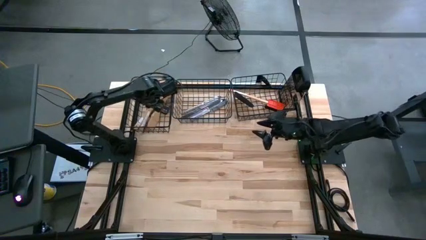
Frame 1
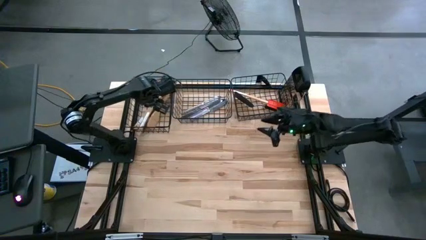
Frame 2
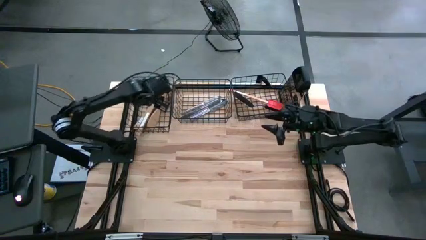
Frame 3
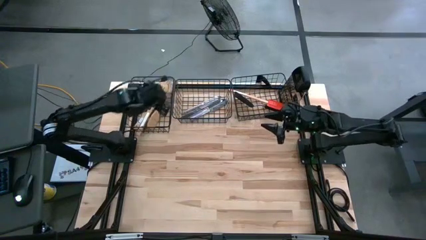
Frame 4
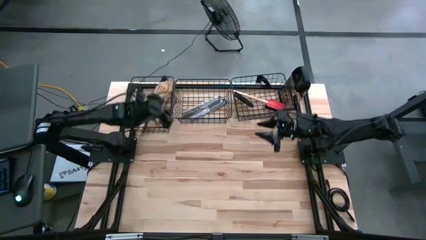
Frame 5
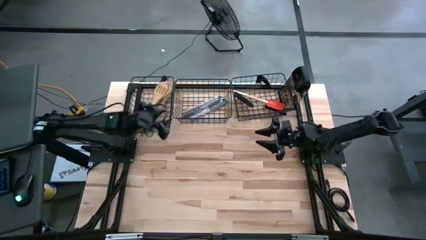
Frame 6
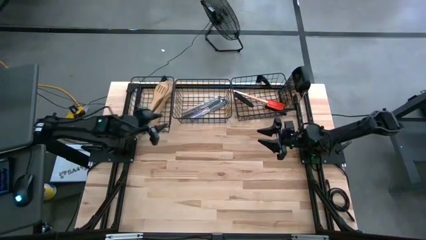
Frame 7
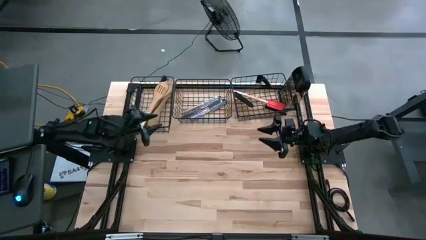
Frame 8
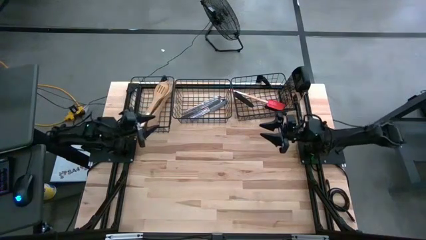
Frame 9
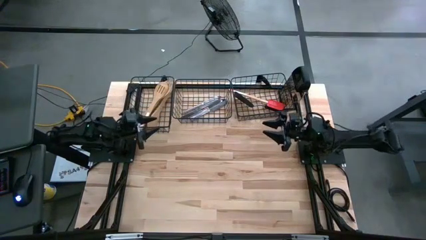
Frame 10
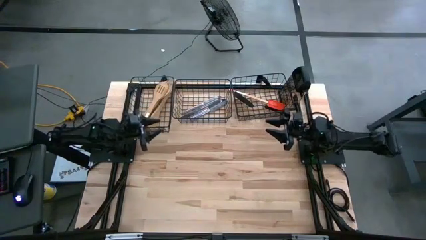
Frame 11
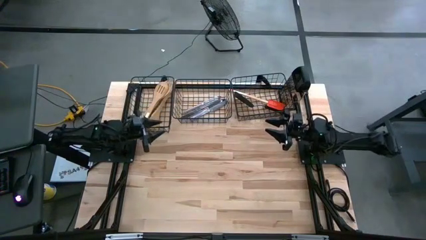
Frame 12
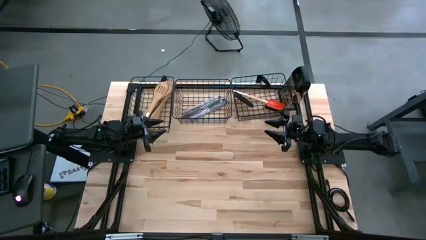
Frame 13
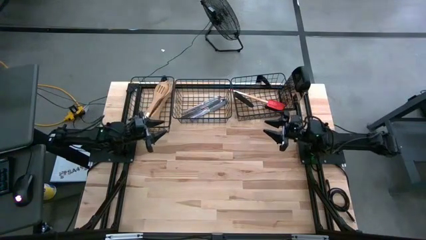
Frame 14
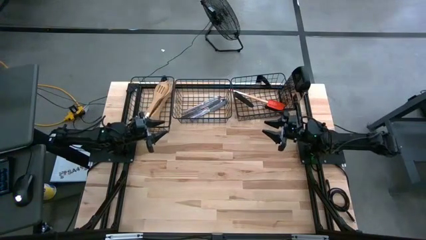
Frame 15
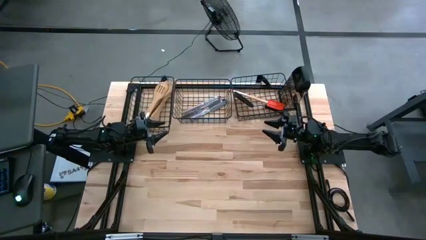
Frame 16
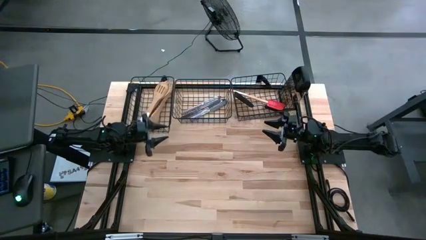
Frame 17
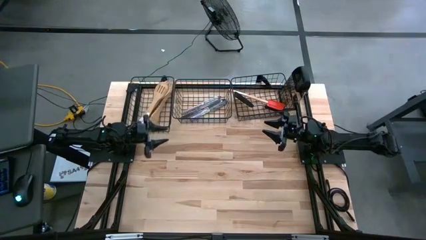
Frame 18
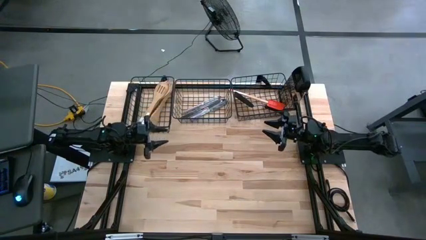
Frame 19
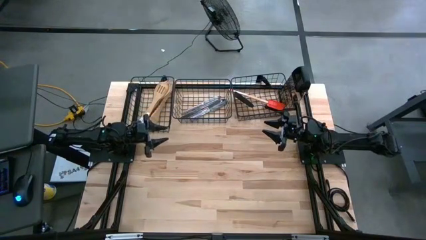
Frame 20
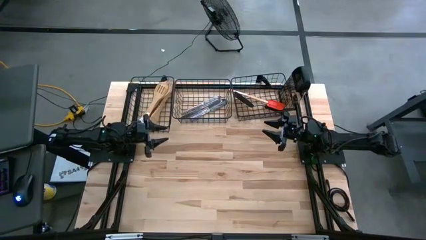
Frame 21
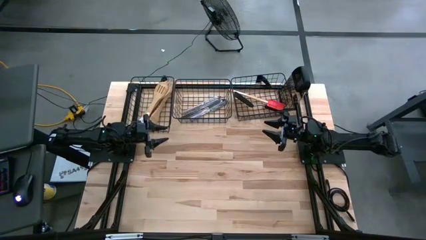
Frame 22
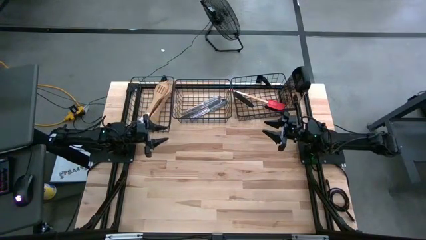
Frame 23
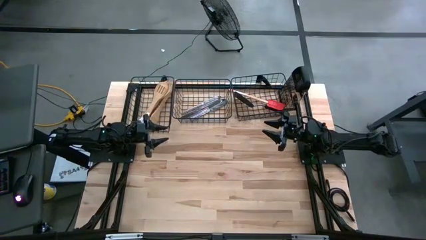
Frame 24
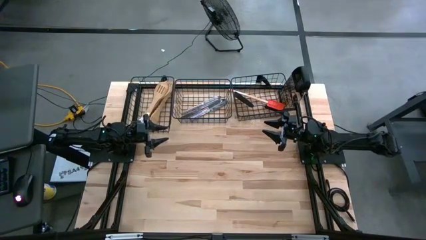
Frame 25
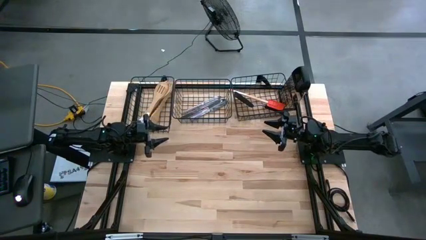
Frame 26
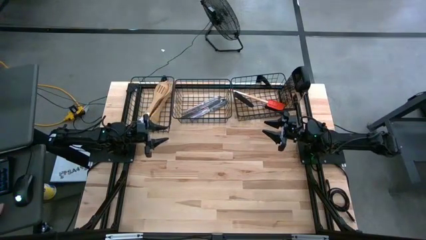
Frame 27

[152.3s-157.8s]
Task: Pick & Place Kitchen Items
Return to Home Position

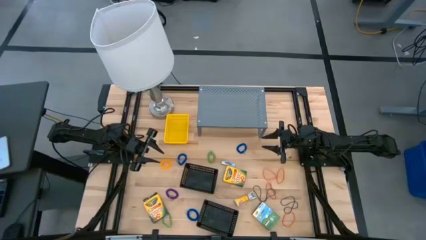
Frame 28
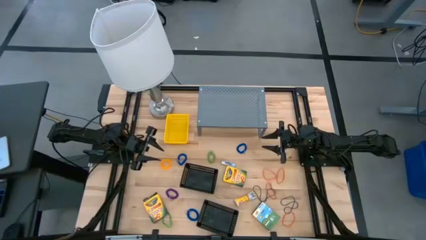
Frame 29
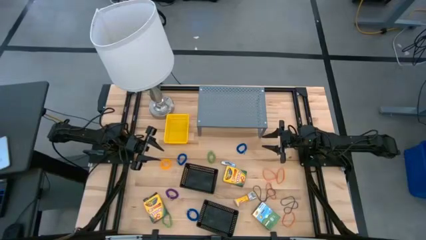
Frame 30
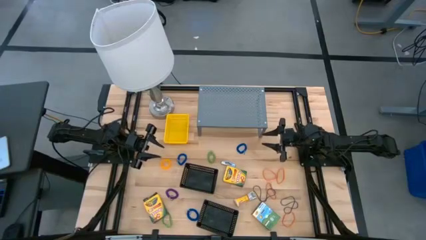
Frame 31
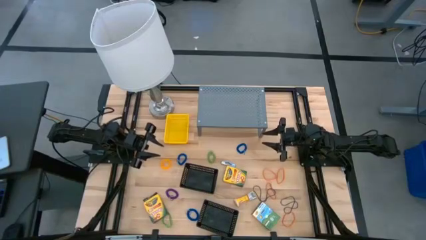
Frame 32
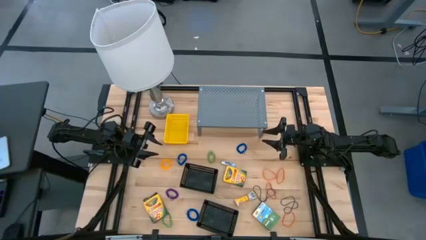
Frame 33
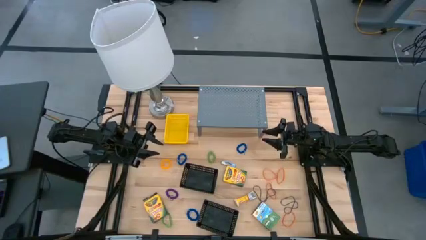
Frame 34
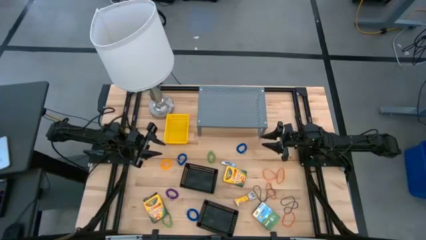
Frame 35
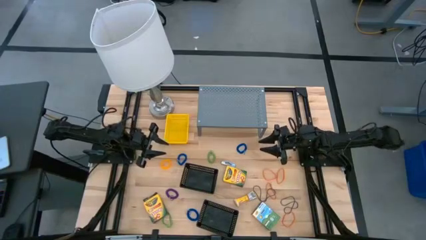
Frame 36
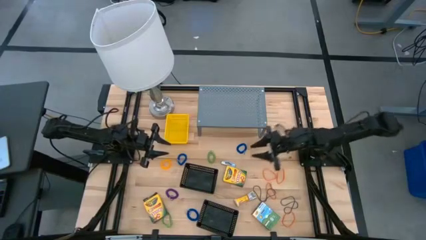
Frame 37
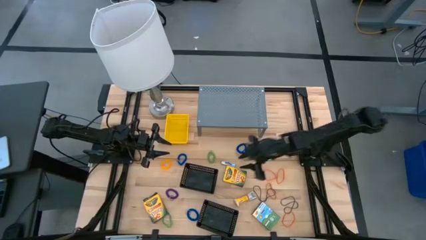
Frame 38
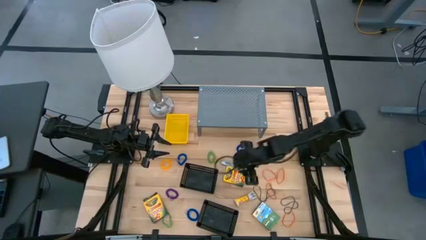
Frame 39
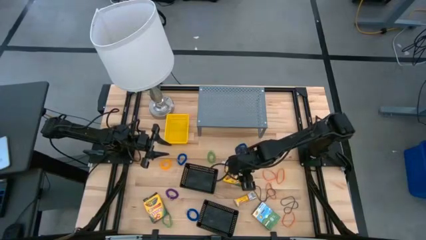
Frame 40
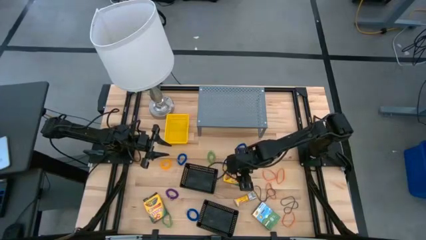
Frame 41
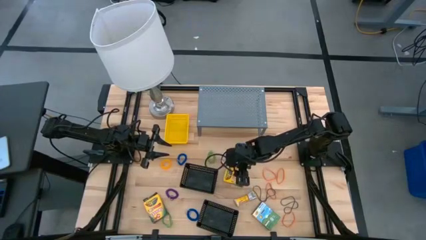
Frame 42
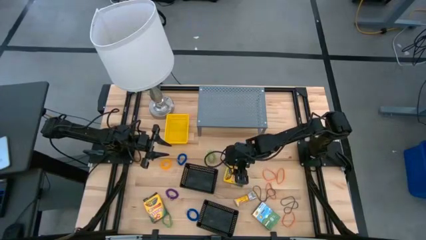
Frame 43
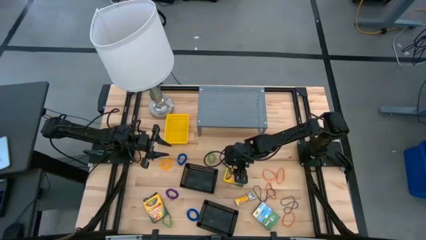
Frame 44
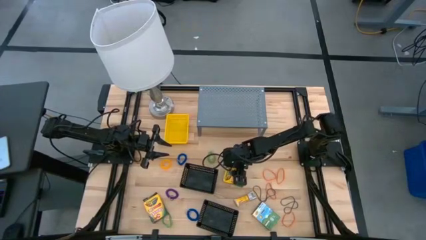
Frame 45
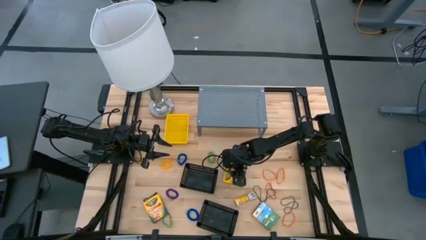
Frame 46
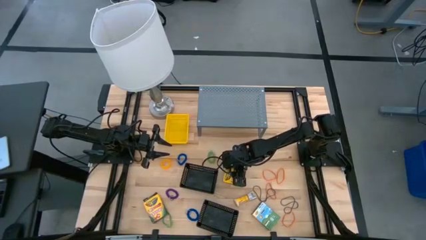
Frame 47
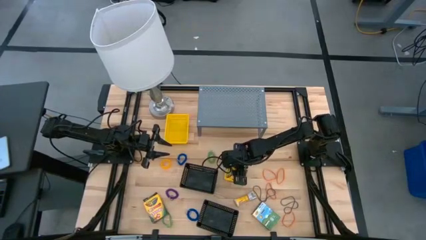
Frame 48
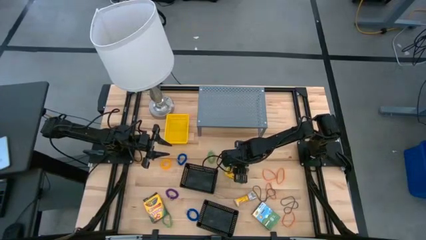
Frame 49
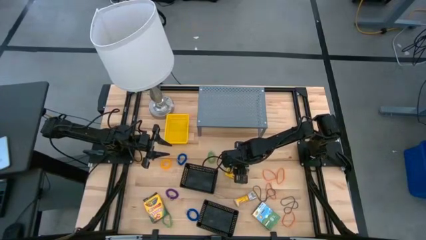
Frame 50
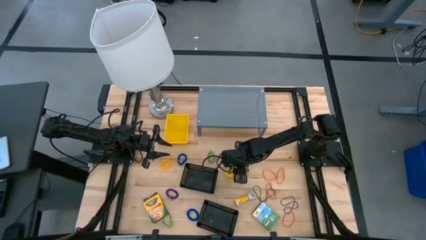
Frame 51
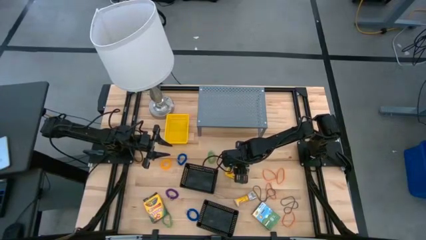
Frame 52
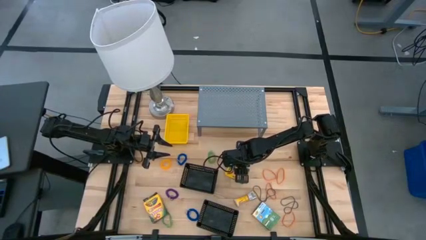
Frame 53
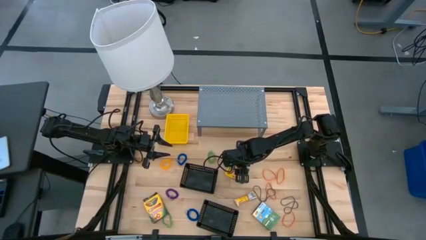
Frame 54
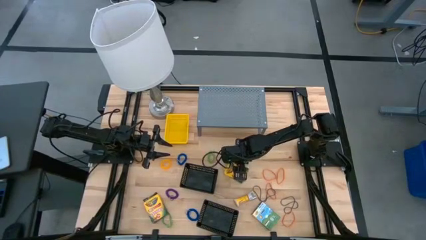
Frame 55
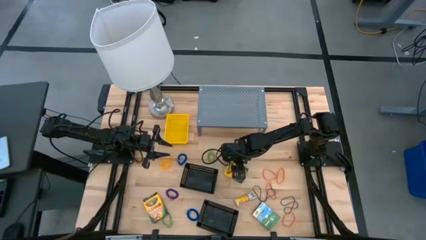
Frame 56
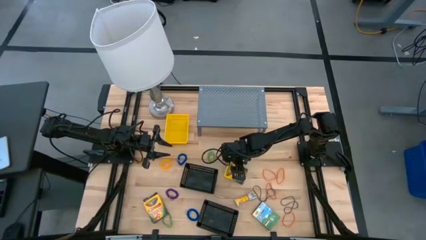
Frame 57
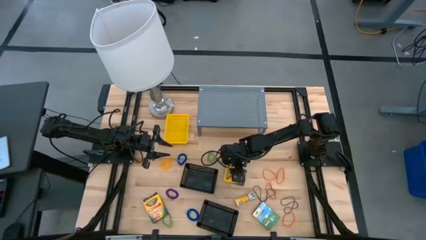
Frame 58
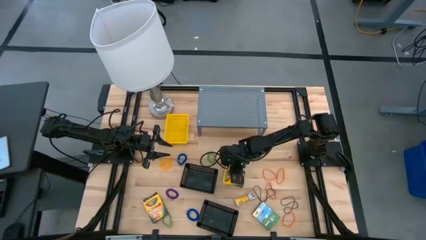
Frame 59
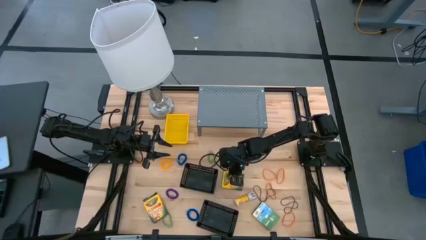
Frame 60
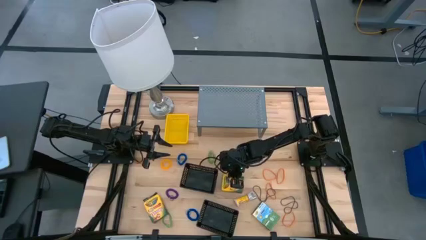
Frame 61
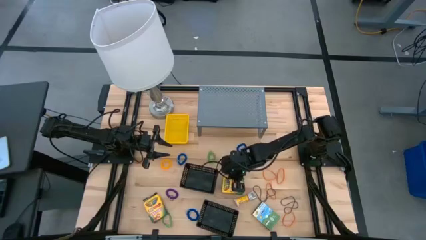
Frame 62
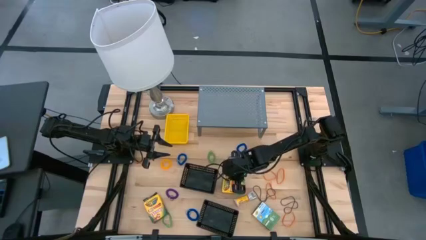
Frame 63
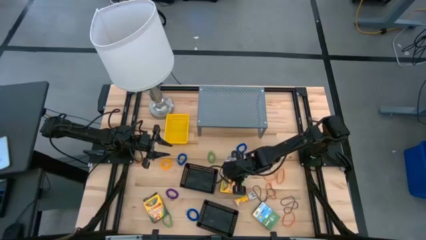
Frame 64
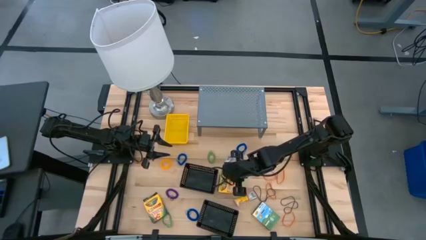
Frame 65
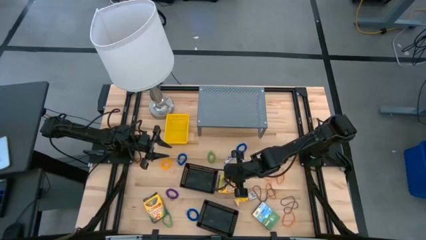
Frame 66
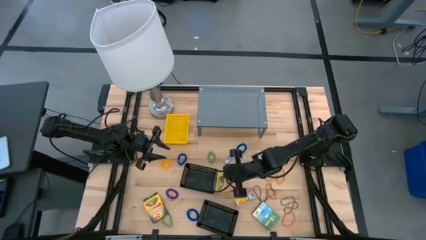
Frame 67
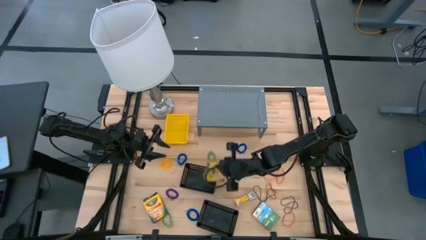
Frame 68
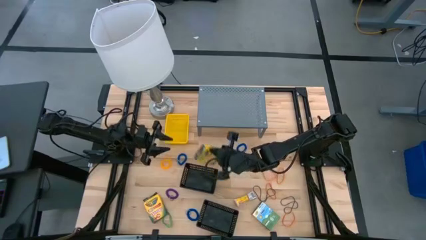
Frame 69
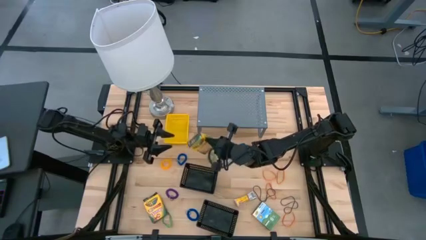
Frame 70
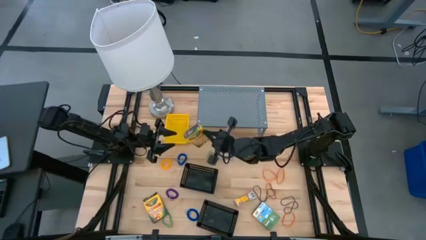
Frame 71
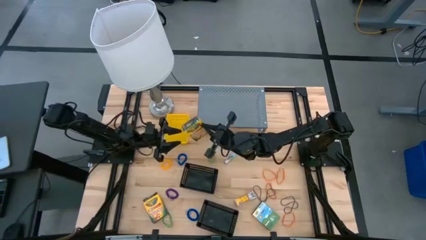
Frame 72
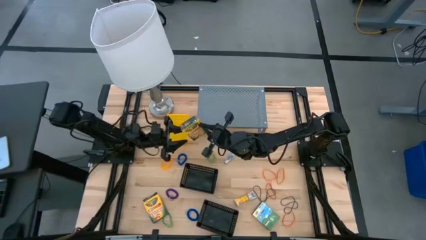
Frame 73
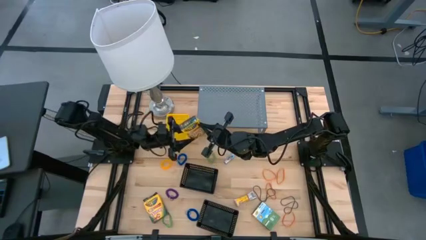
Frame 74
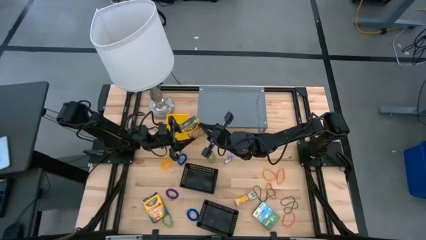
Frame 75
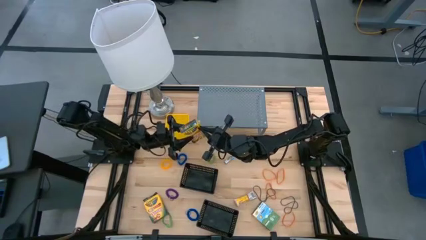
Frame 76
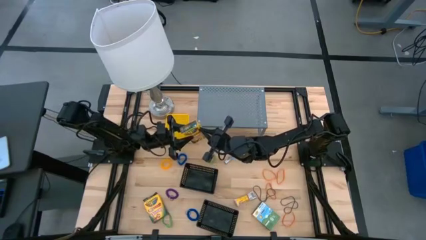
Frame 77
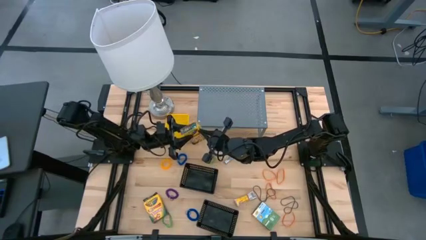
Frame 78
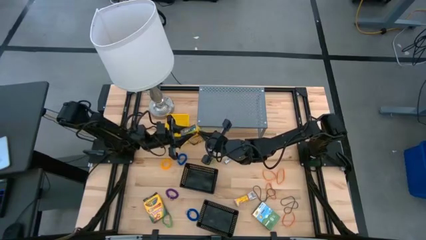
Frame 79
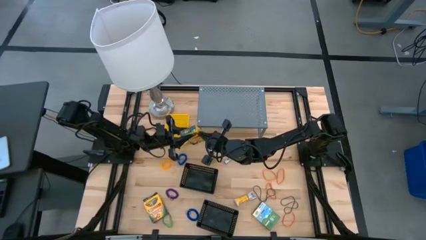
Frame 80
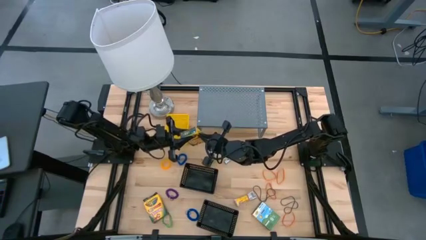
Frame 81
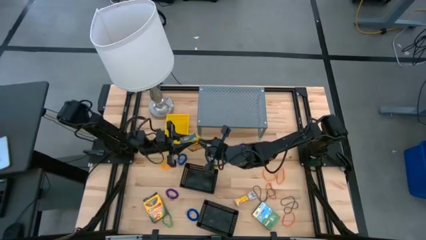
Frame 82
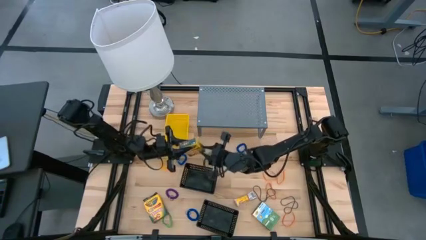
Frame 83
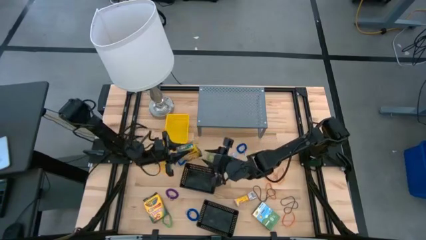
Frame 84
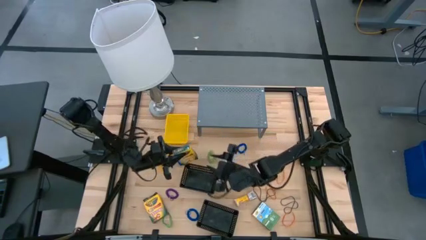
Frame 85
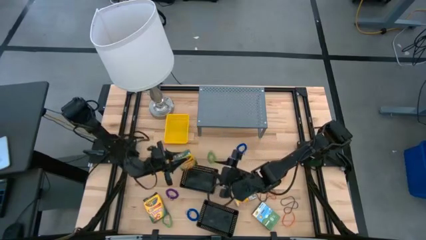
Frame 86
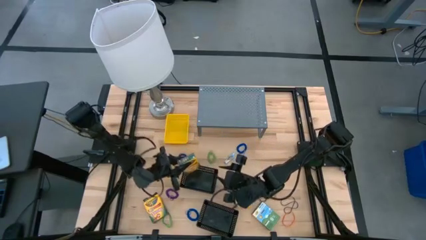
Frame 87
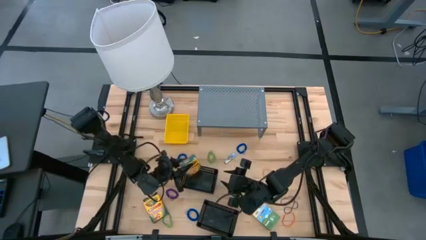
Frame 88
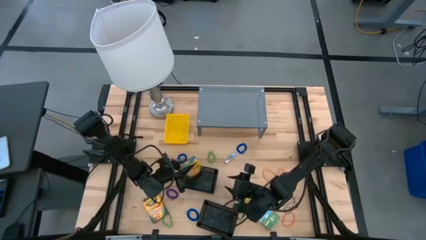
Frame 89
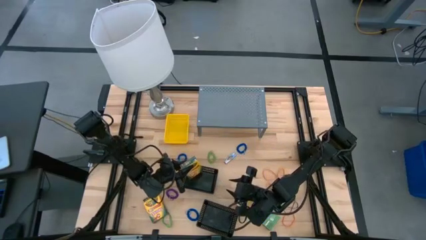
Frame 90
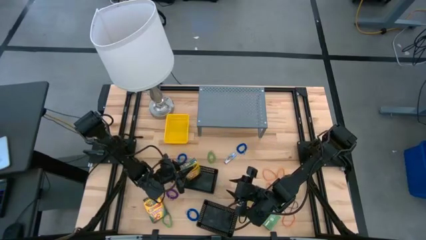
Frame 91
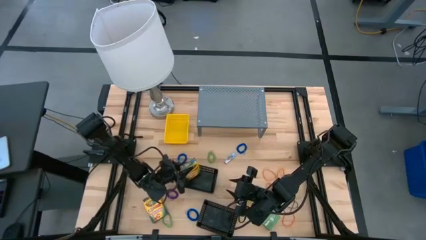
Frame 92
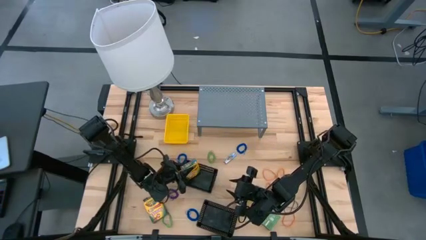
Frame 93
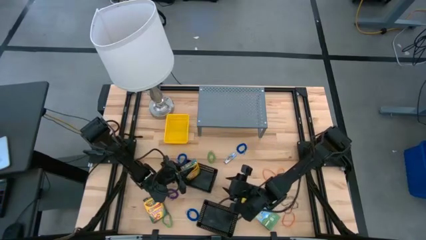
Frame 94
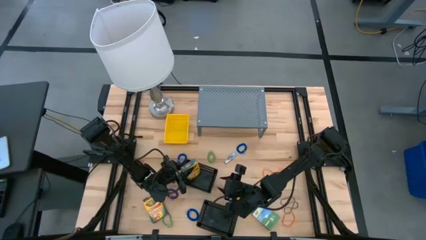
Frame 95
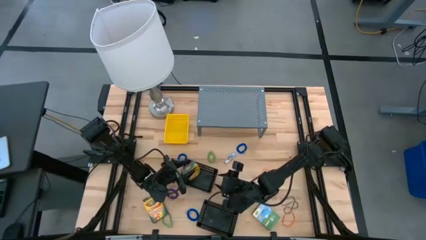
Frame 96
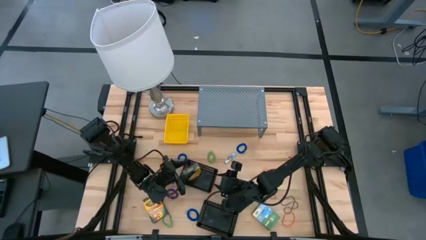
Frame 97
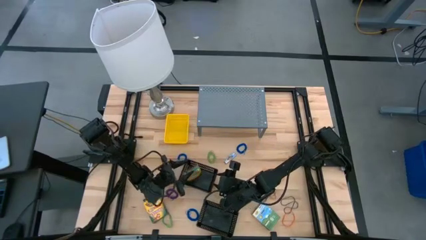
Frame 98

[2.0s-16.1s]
Task: Pick & Place Office Desk Supplies
Put the right large yellow crayon box into the top black bin
